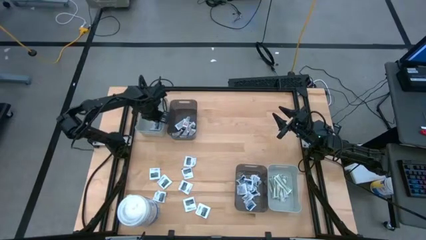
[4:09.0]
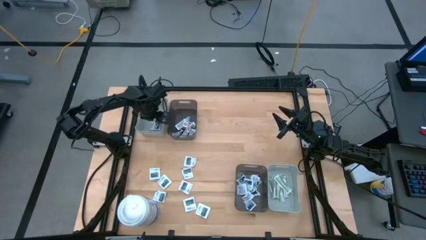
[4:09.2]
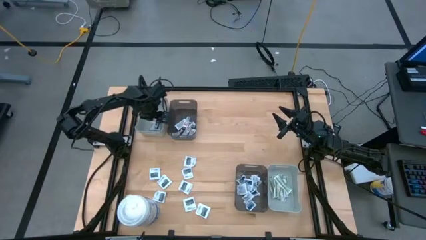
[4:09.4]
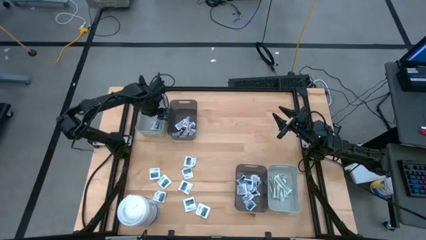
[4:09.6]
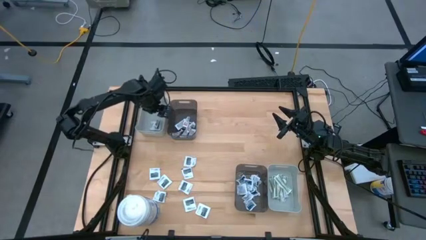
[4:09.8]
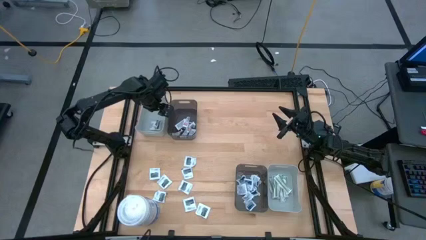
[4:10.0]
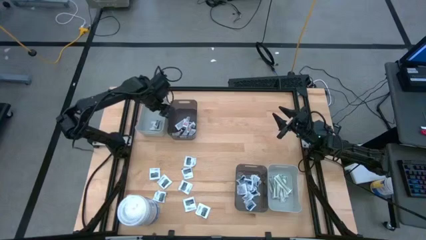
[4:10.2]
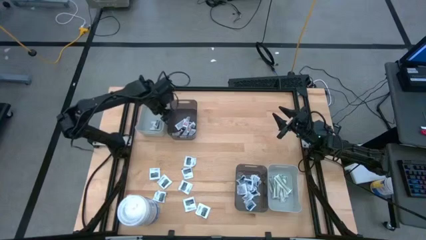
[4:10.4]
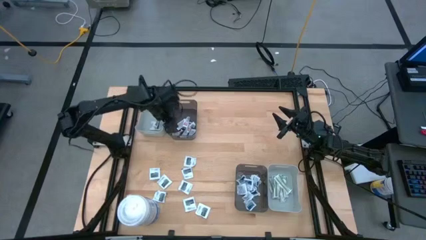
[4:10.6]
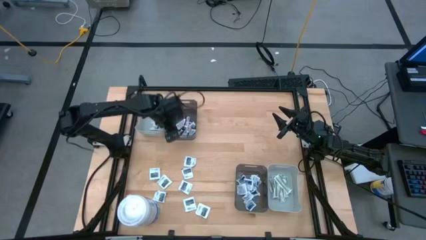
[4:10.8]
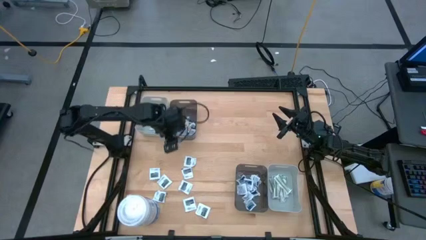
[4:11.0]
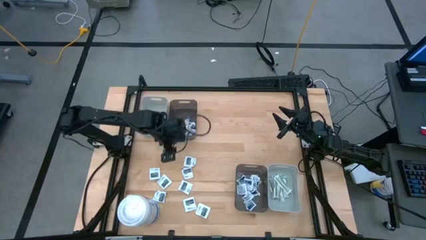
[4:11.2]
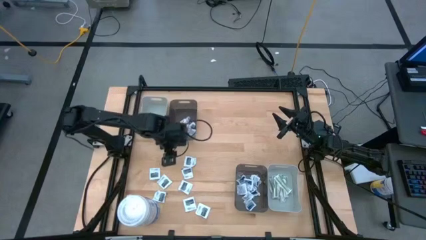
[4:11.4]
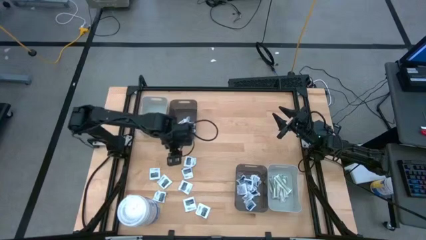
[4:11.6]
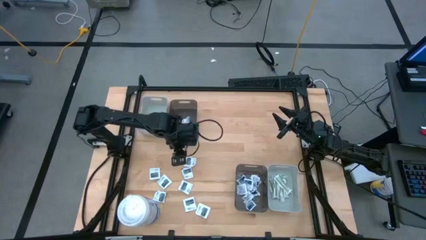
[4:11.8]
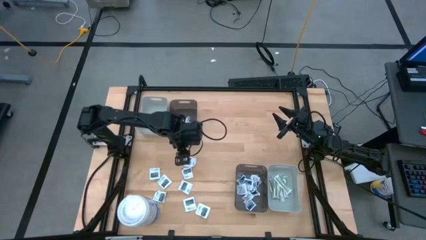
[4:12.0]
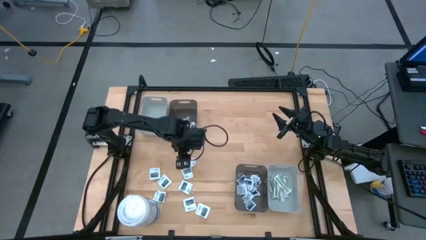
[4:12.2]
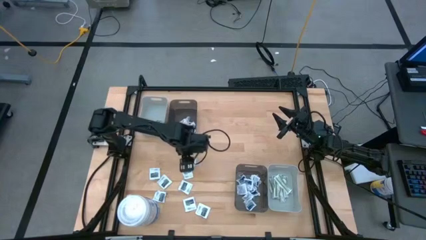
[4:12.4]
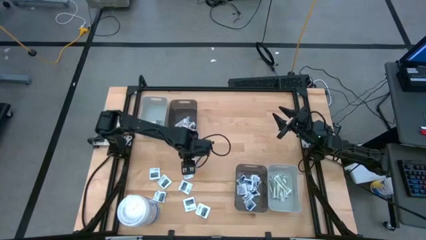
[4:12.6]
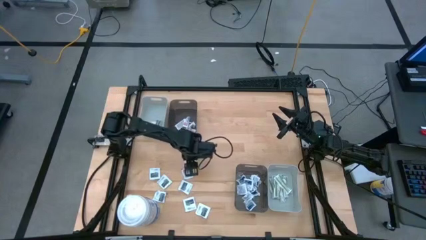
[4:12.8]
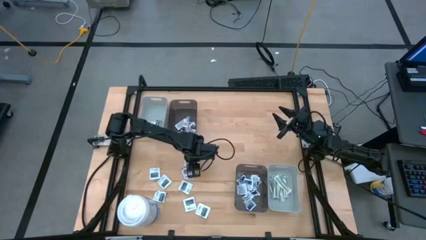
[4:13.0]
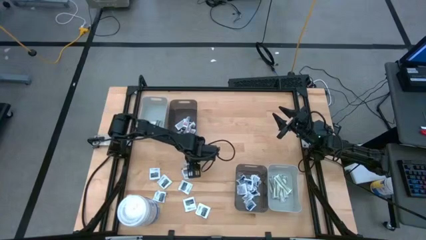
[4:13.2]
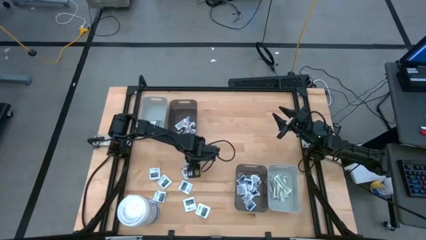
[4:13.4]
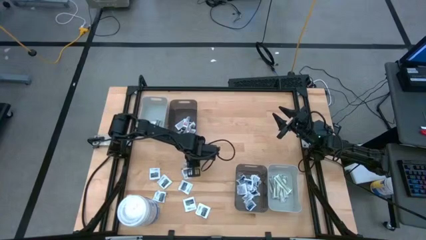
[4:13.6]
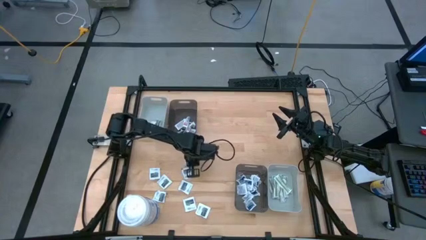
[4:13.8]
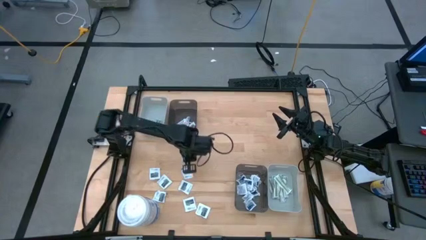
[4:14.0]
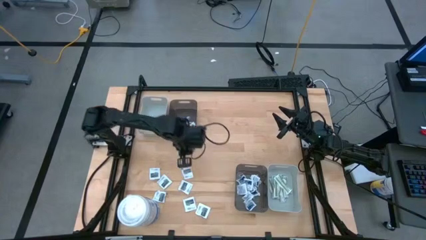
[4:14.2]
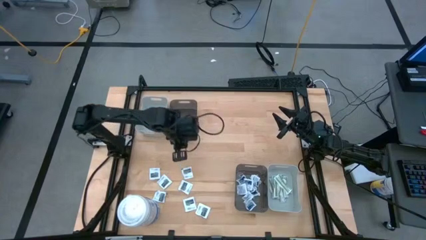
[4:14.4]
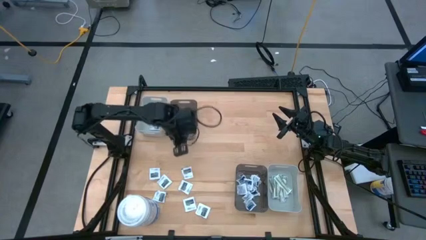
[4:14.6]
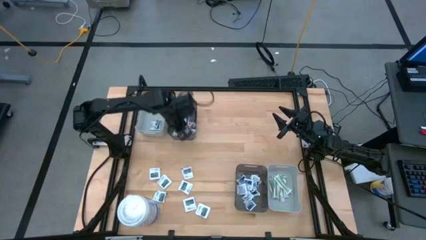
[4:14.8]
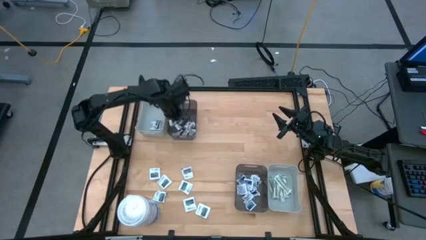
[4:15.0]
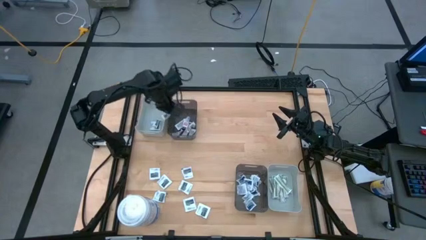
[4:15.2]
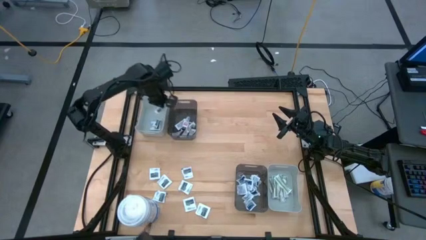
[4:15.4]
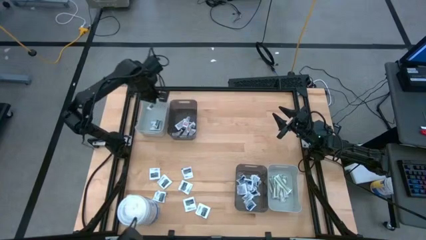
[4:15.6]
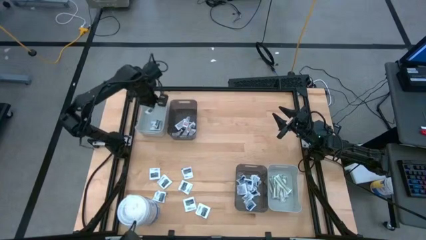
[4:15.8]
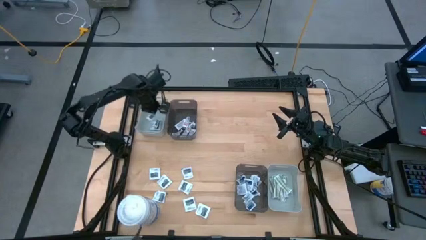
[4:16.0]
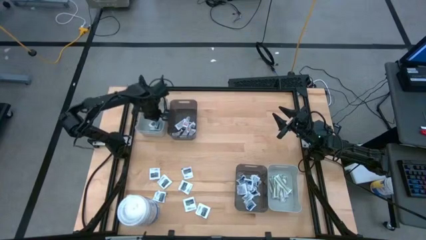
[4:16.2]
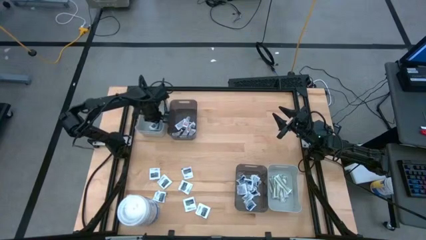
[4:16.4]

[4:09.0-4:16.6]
Task: Pick & Place First Aid Supplies
Put the white towelette pack into the top gray bin

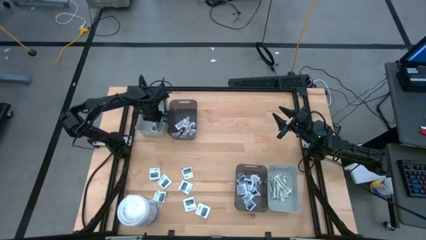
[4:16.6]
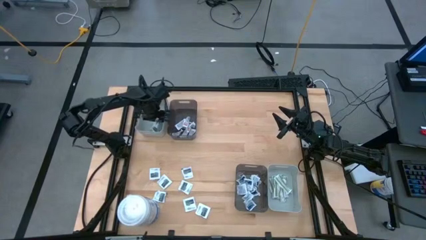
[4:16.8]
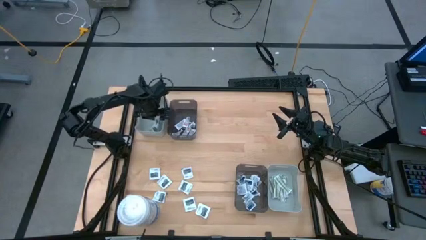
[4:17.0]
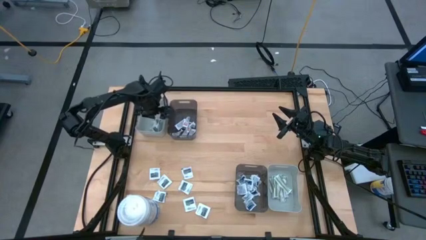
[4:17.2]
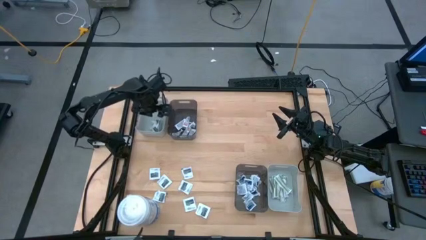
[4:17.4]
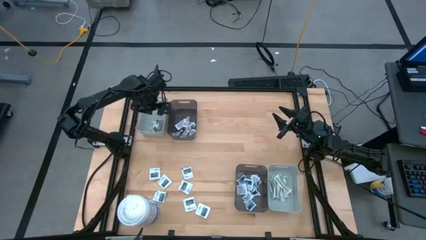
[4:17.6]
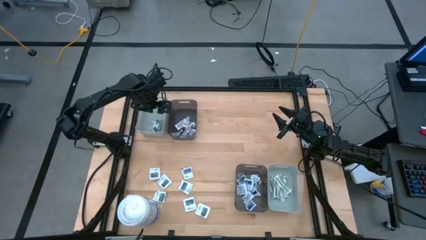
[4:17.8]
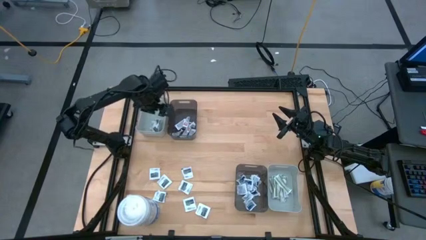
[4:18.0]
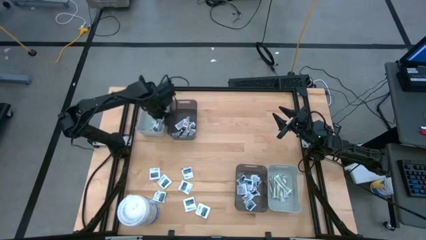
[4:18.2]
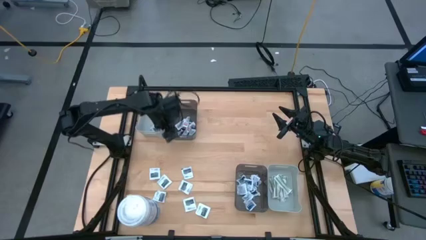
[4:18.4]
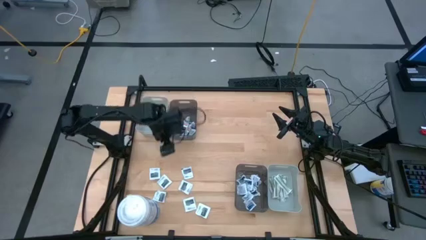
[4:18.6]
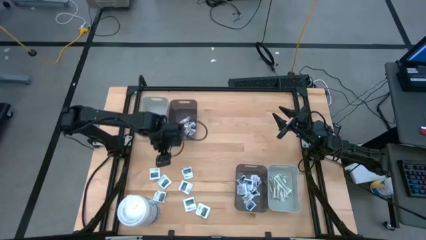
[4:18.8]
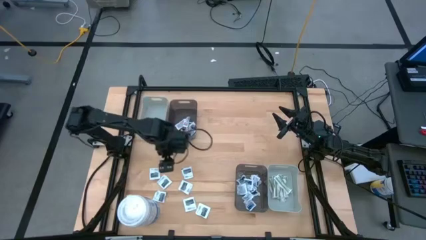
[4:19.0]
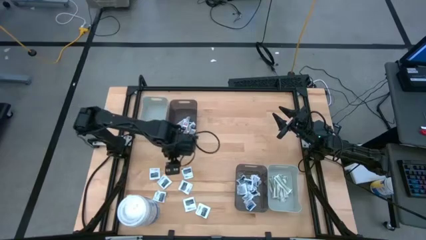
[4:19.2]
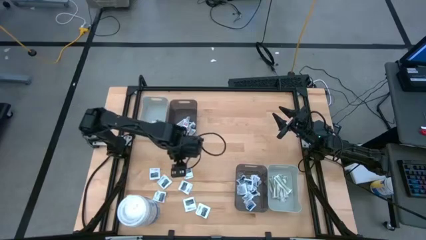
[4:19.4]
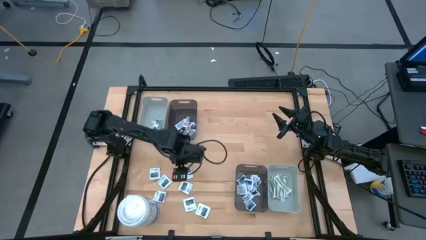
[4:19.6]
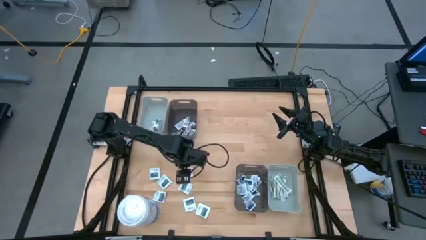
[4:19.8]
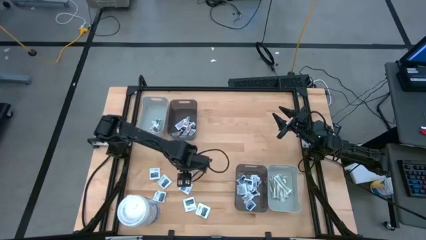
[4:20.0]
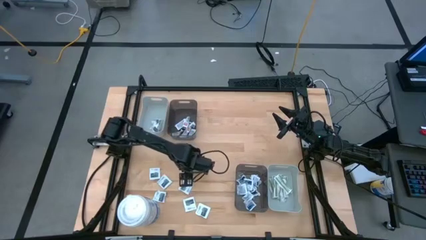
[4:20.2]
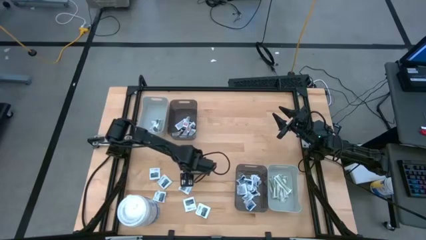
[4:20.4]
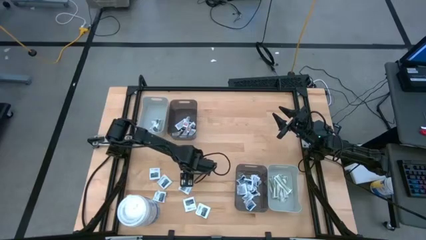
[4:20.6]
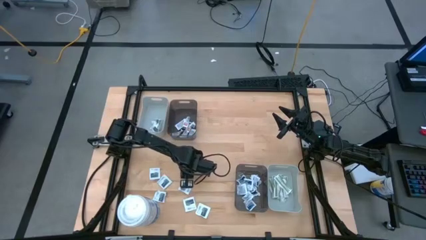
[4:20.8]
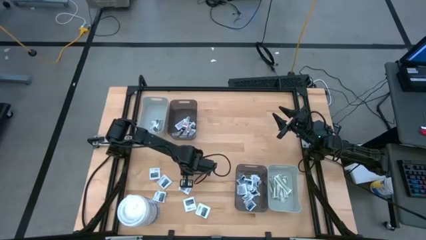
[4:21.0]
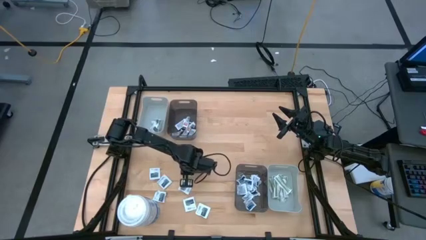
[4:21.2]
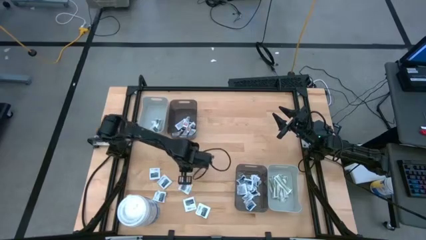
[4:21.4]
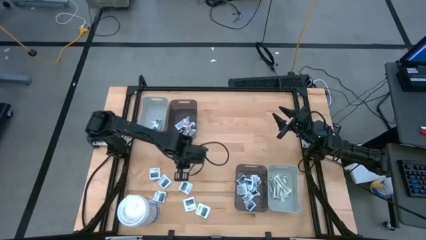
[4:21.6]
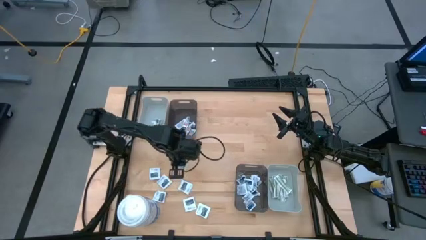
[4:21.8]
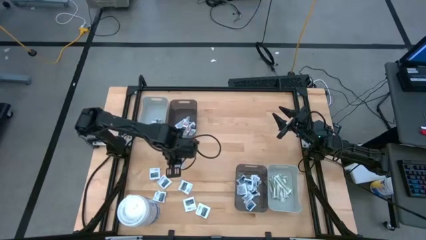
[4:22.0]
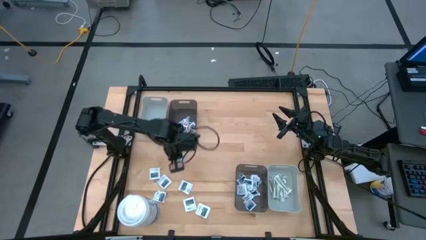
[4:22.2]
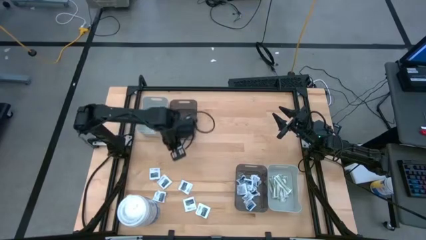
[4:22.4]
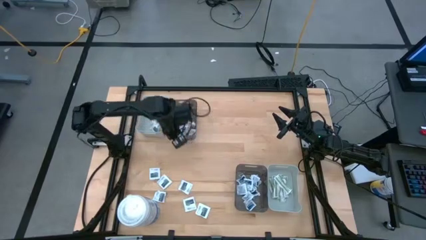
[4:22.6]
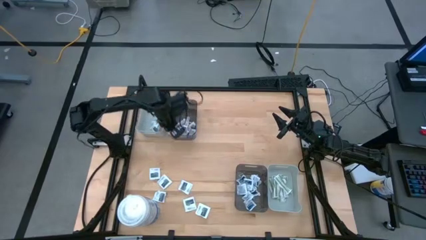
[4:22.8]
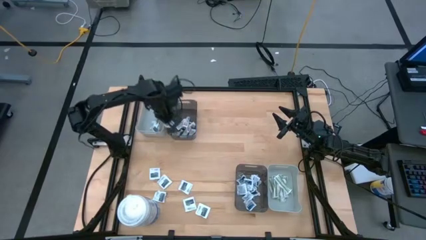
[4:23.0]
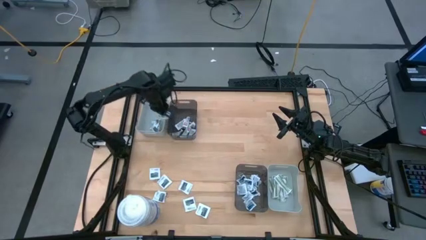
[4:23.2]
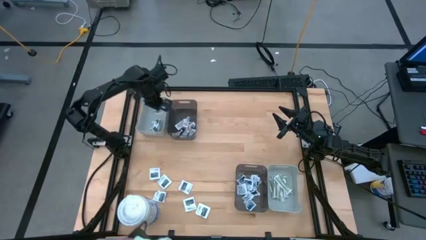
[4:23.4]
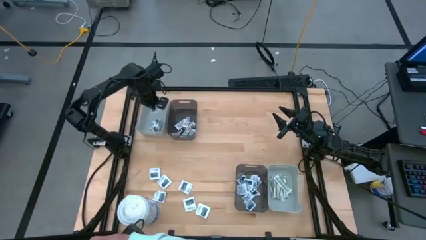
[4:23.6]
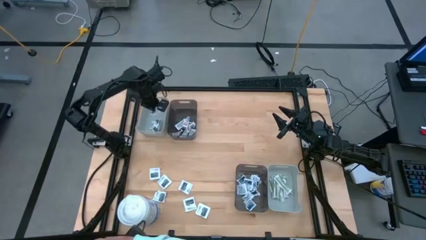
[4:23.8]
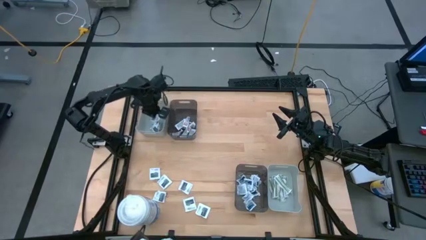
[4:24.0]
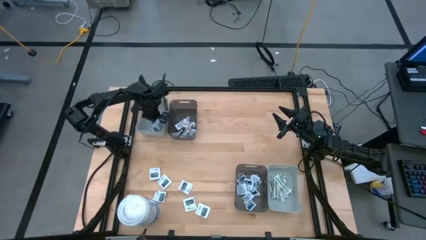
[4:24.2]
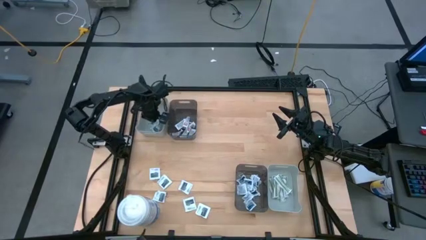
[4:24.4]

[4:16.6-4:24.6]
Put the white towelette pack into the top gray bin
